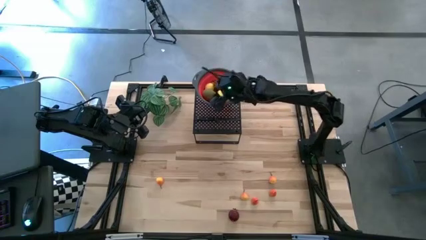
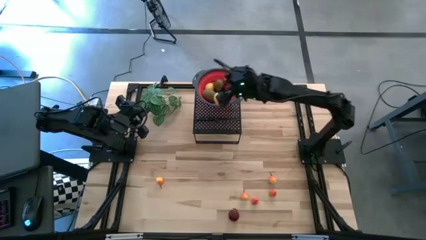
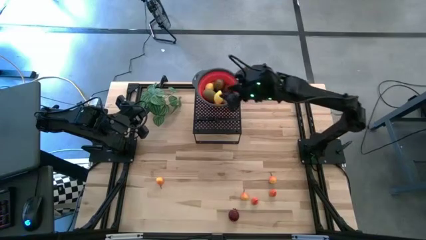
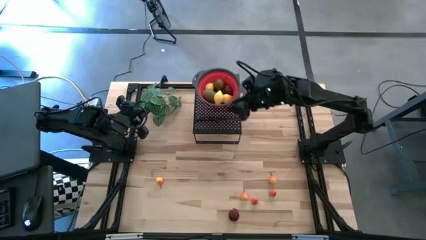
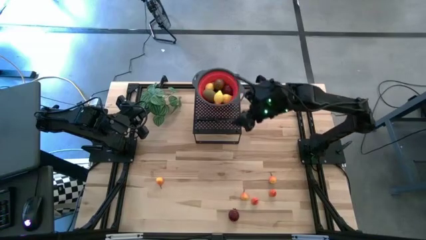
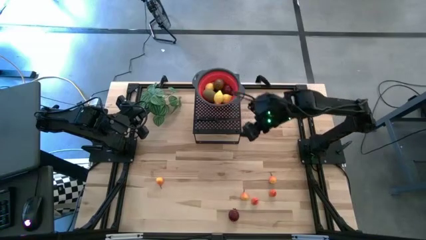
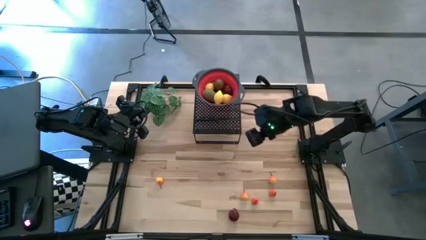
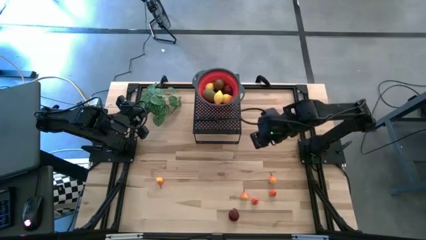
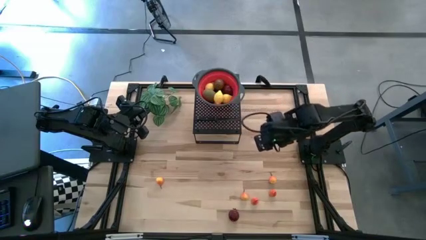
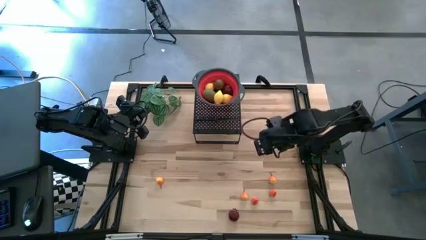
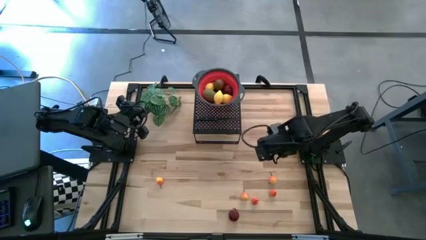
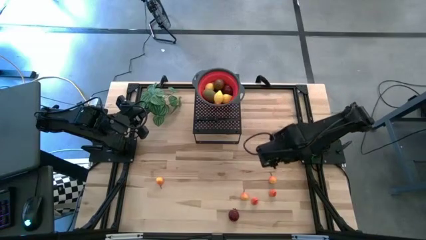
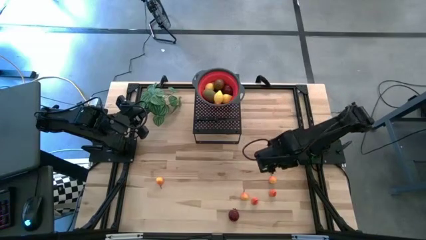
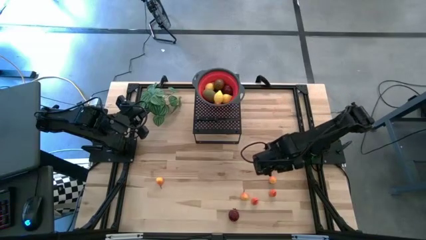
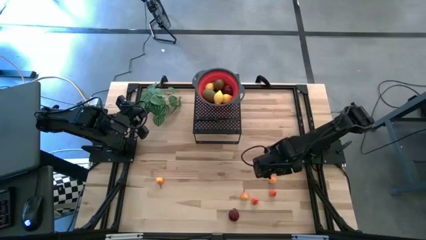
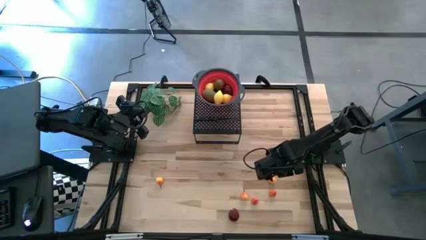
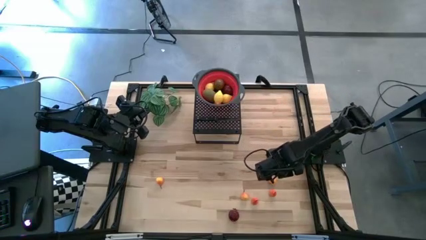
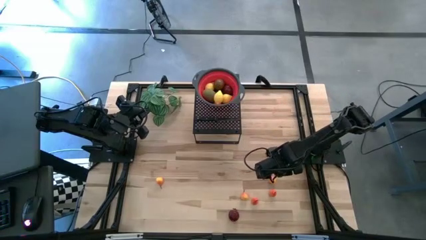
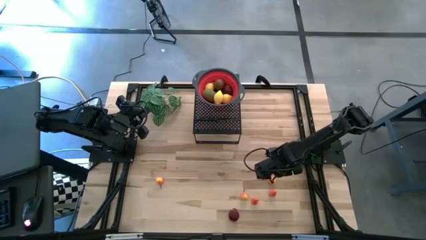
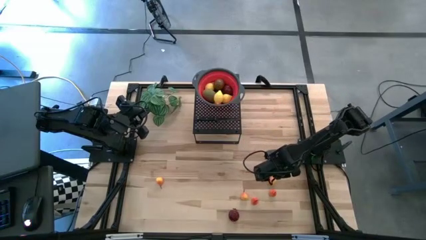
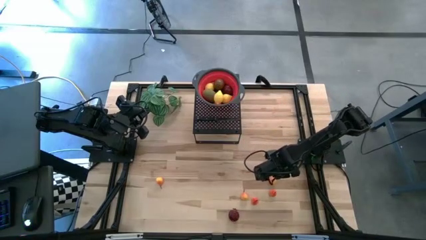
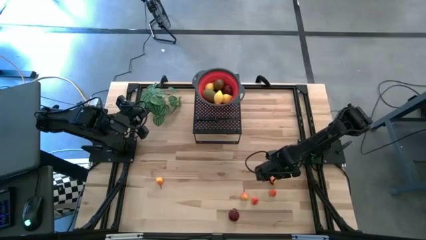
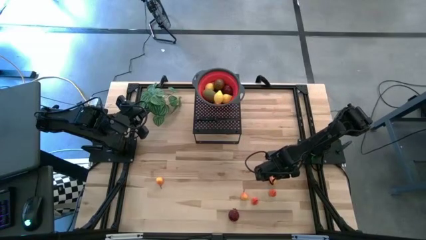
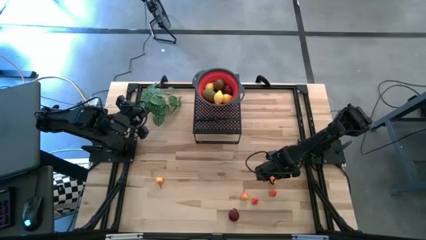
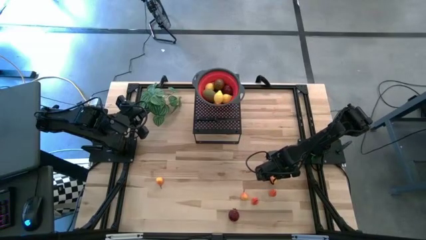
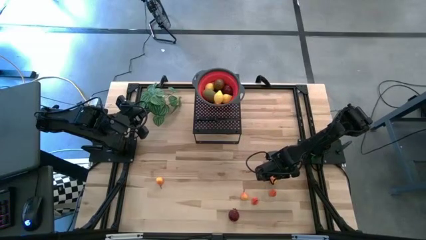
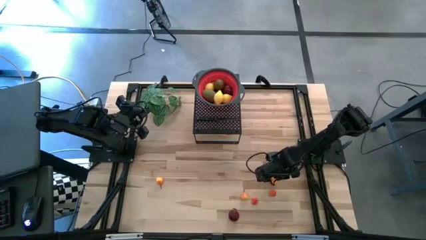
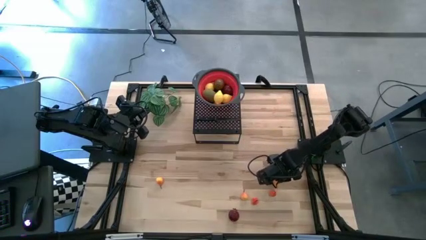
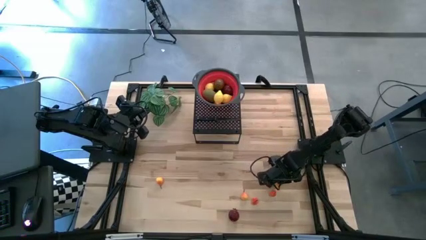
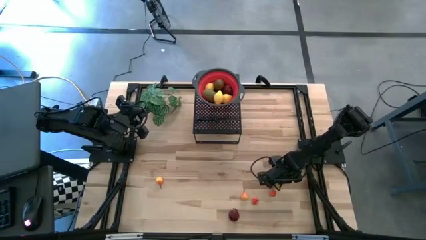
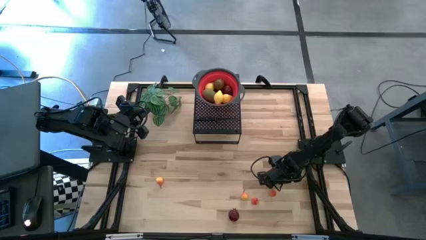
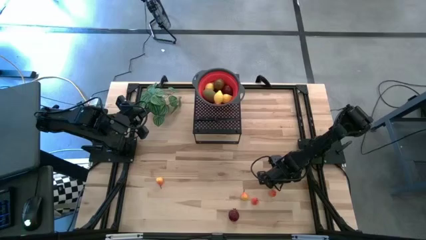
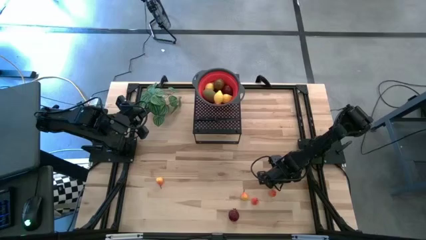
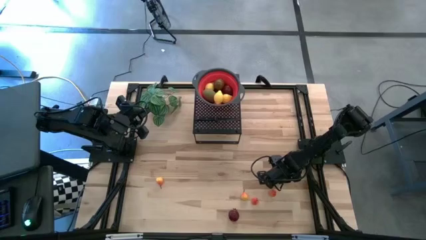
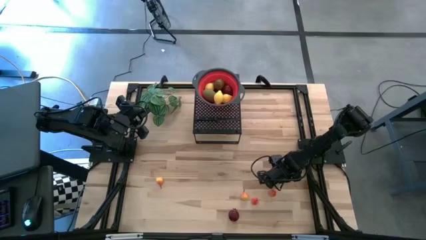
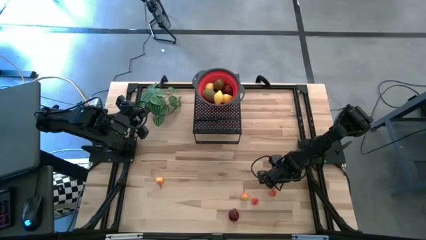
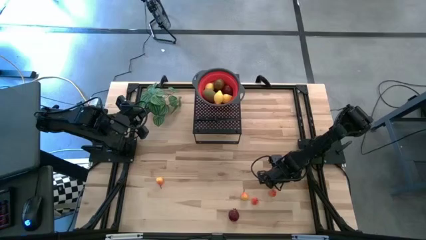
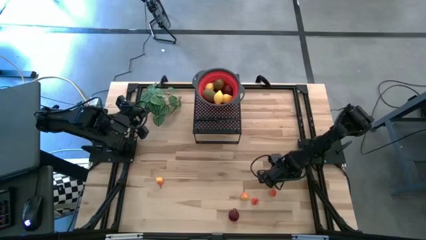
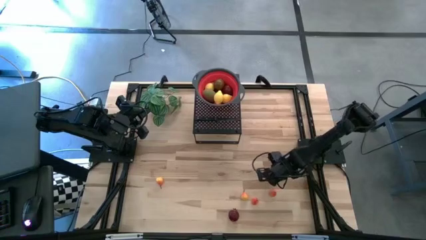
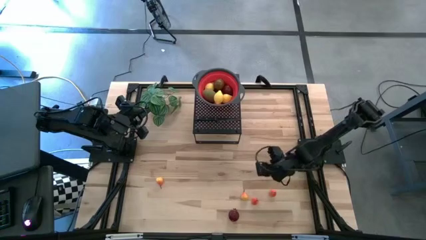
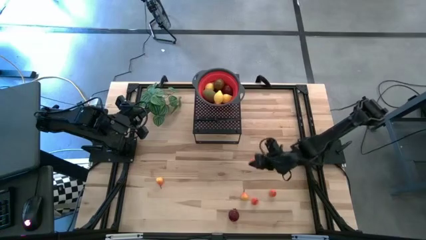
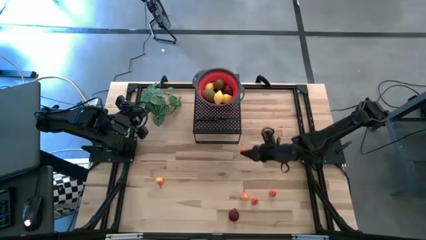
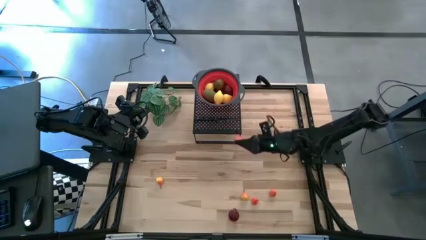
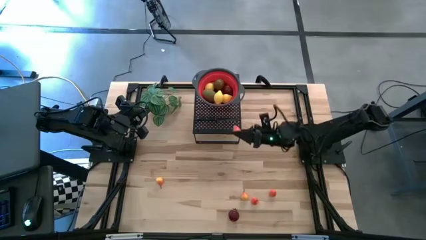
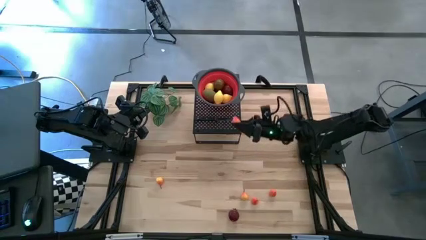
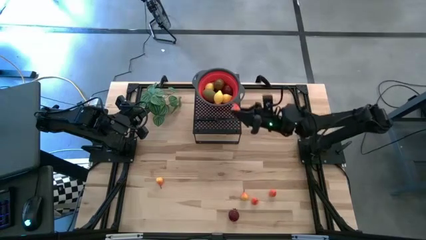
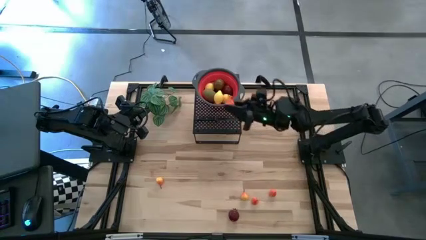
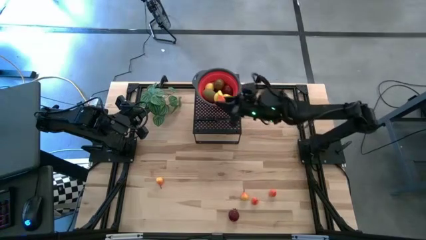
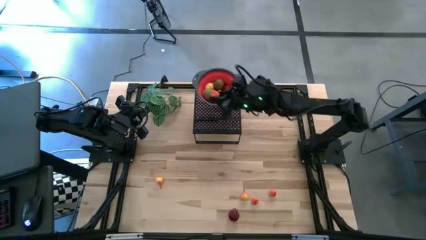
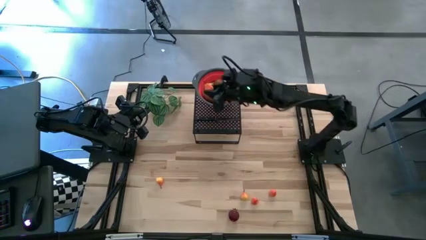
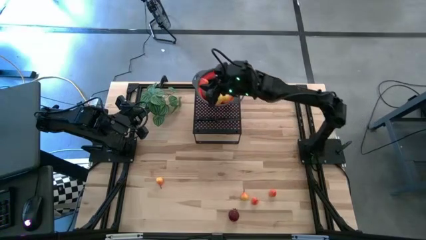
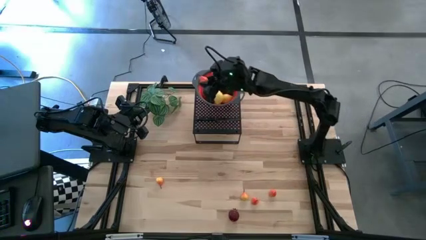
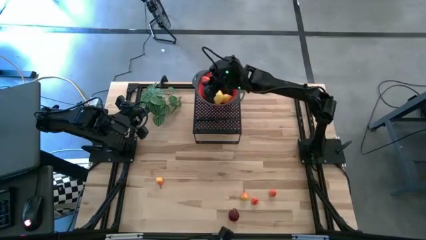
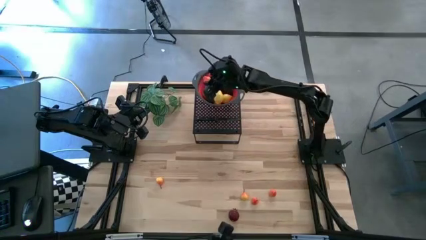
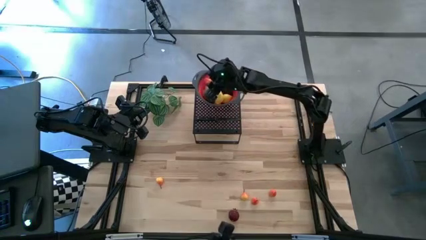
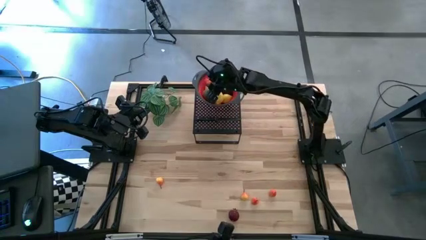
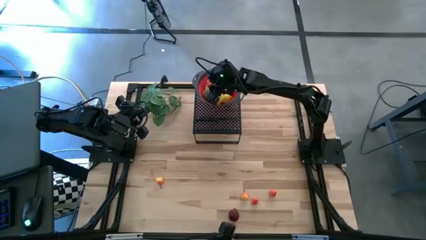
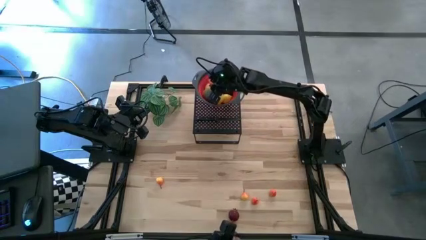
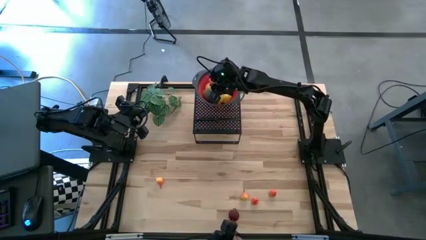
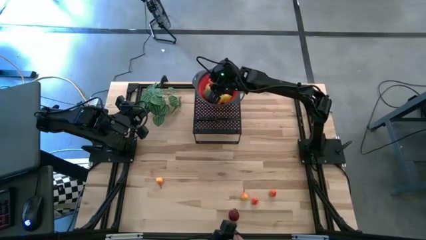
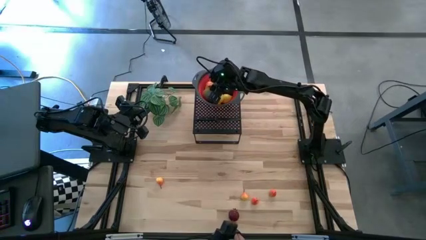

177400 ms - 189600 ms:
Task: Pick & Place Fruit
Put the pear into the red strainer bowl
